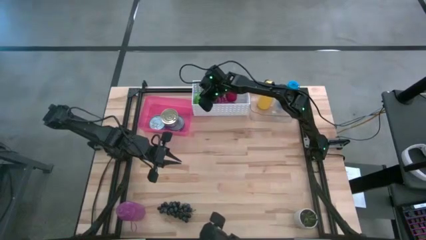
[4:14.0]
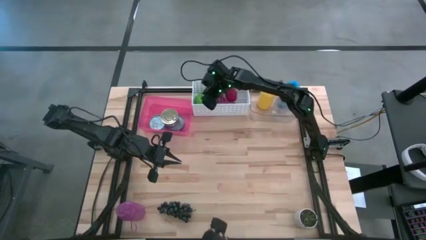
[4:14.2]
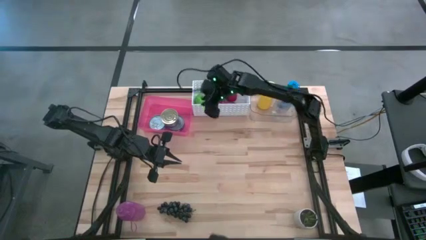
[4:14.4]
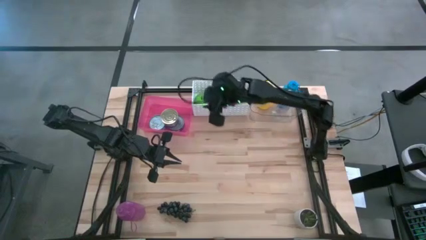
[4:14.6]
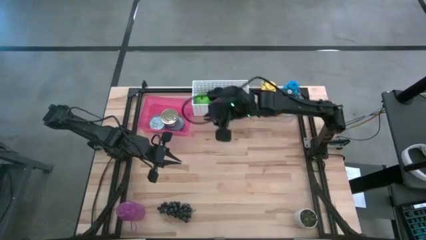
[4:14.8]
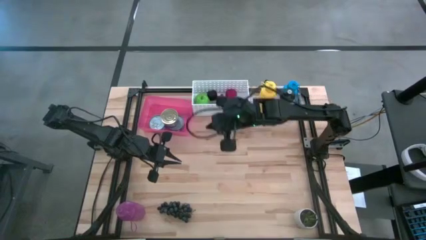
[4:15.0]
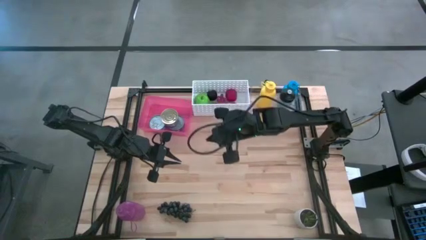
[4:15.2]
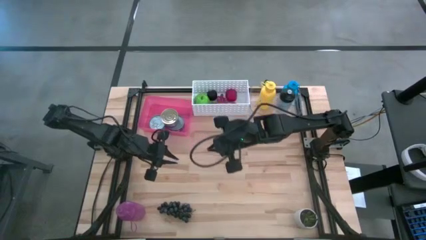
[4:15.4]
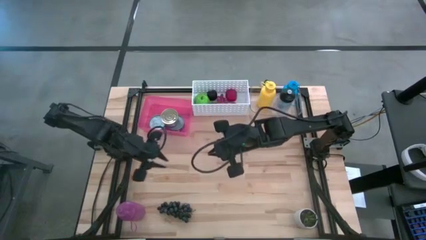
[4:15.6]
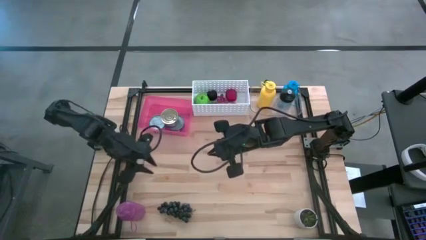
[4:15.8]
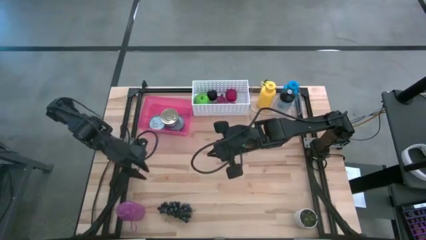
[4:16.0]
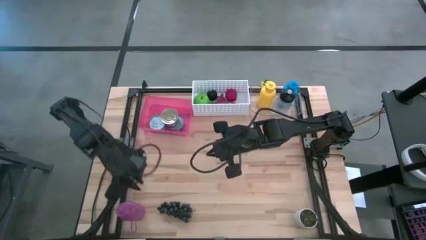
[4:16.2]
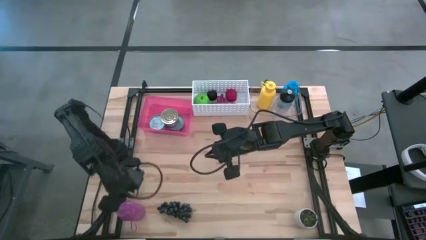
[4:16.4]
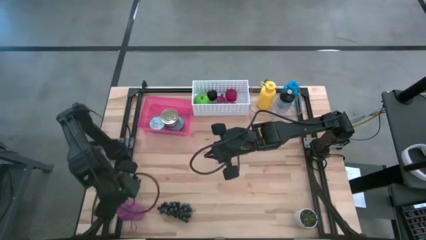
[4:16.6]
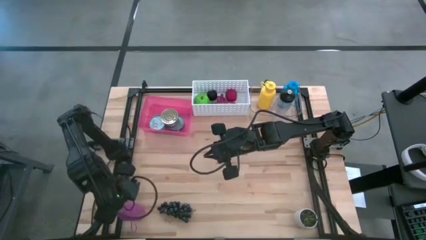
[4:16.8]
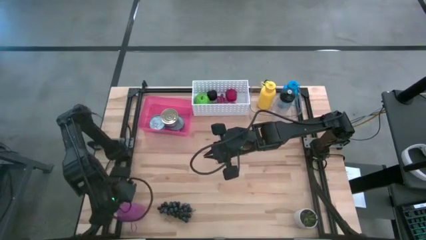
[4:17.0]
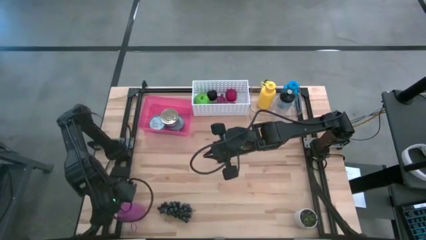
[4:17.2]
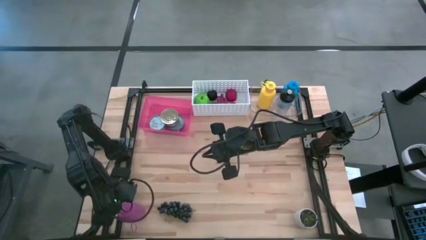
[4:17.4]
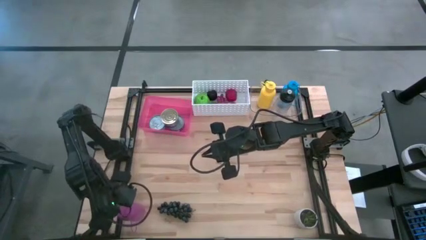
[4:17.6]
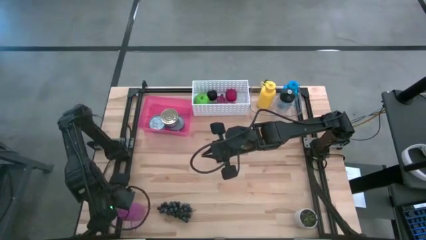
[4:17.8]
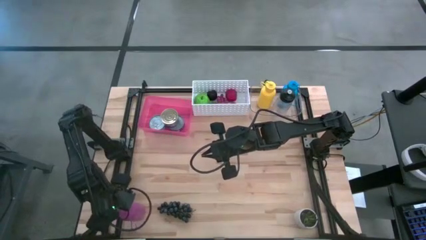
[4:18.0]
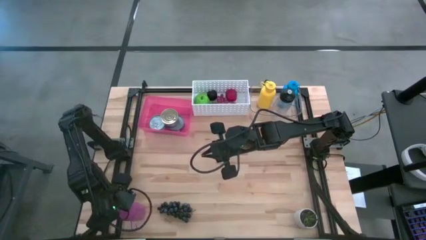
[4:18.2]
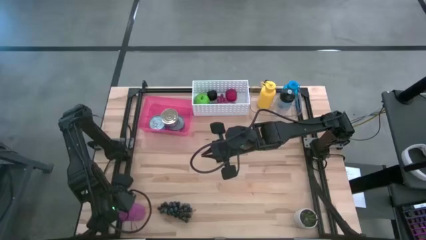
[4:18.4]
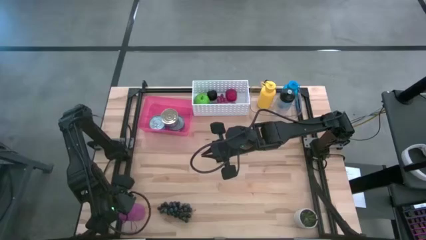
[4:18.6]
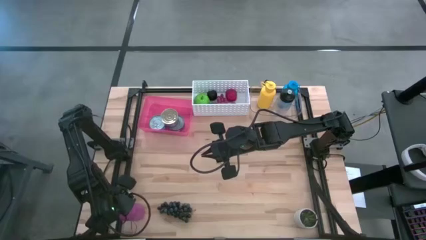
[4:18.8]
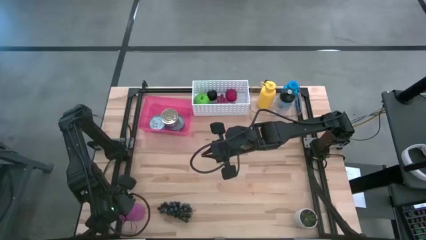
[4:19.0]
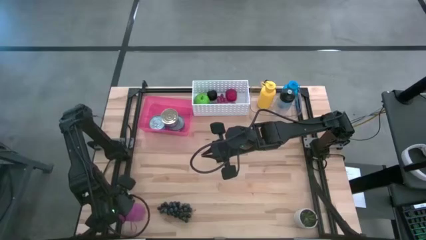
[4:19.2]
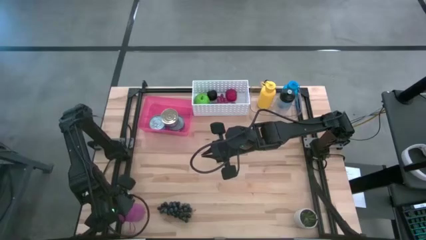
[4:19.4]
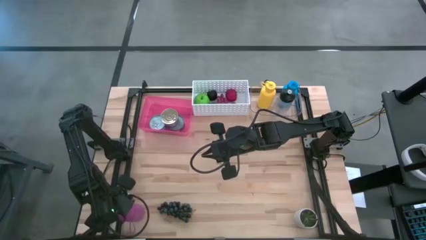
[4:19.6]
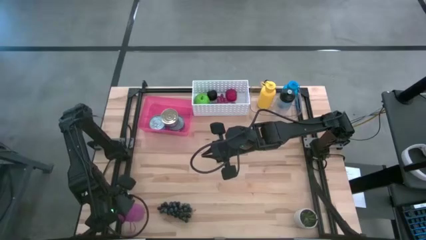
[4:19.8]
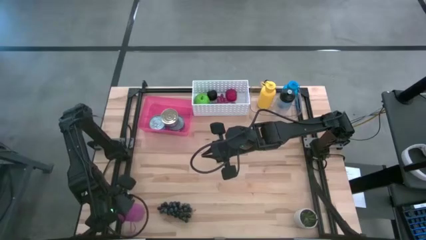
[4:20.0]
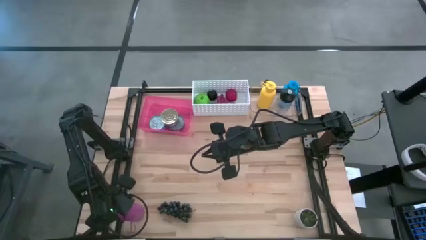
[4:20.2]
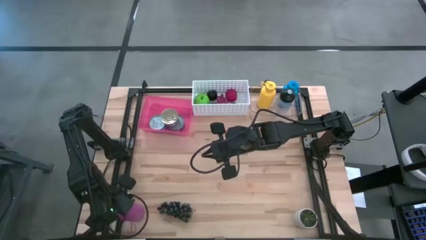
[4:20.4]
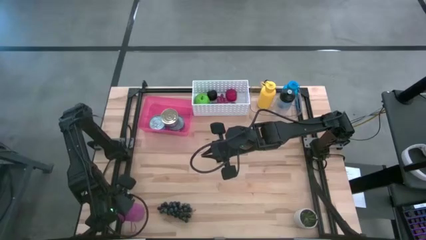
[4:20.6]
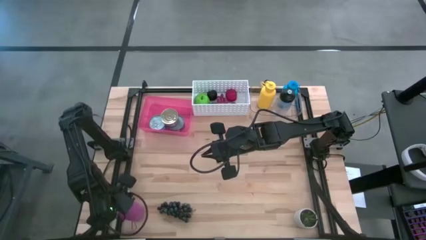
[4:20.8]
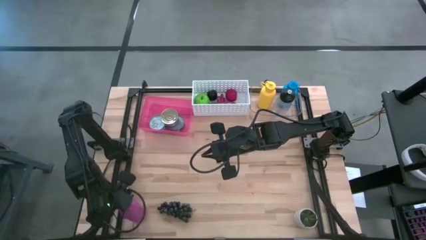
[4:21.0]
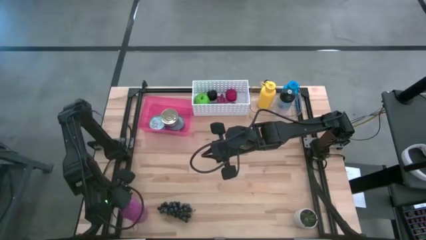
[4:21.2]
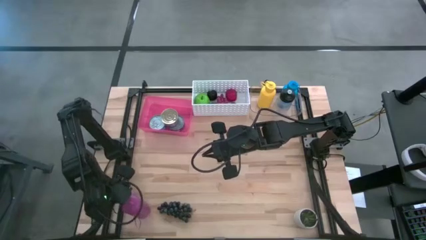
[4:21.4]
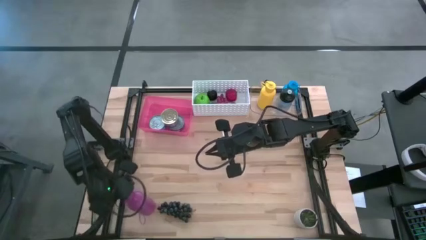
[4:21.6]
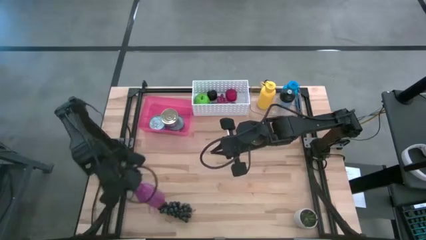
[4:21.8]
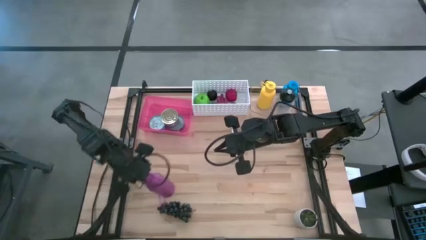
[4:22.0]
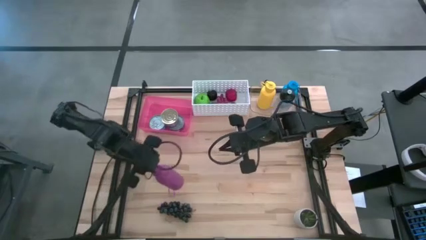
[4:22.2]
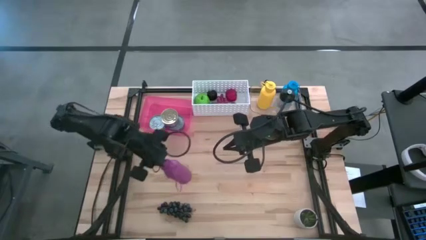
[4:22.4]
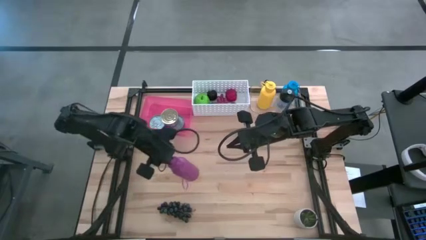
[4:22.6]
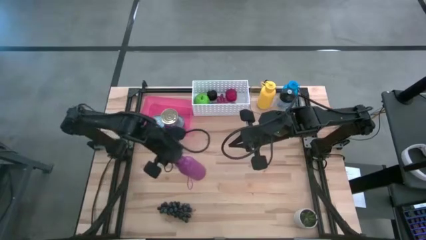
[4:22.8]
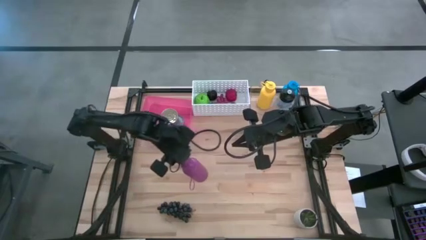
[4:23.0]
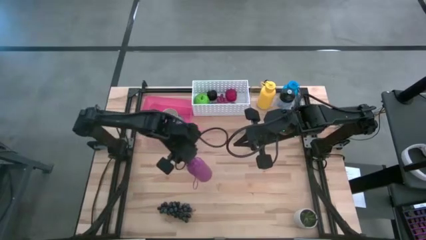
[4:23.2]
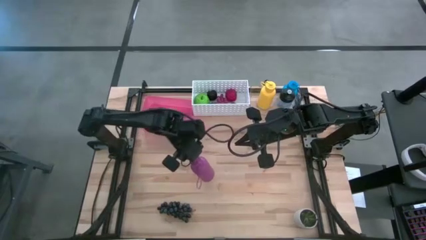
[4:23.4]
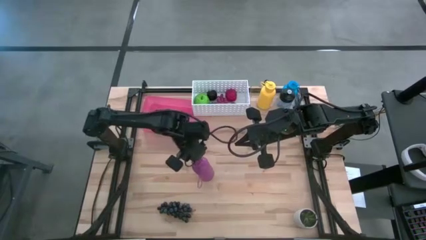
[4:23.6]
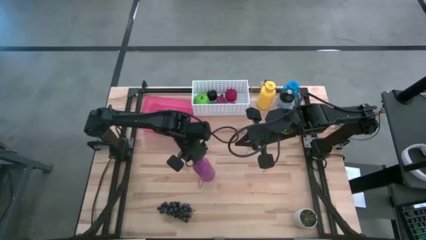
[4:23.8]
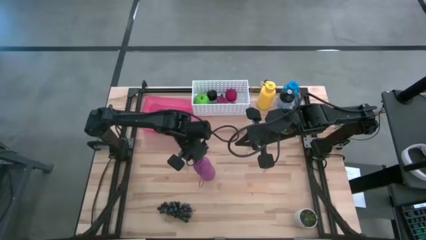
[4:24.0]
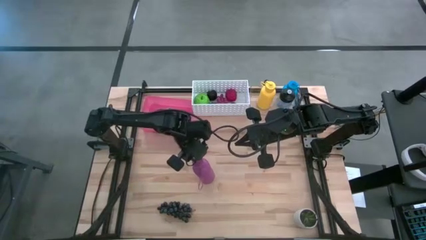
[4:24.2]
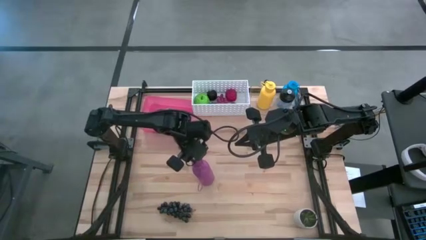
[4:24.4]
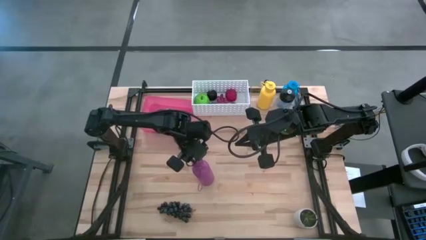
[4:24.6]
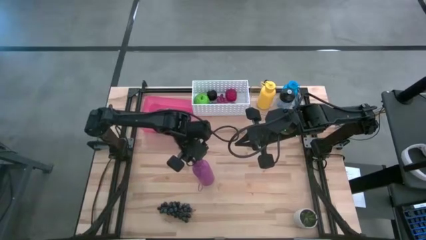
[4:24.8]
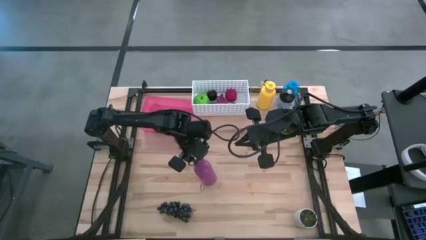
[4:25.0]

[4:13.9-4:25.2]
Task: Pick & Place Food Item
Put the purple water bottle into the transparent bin

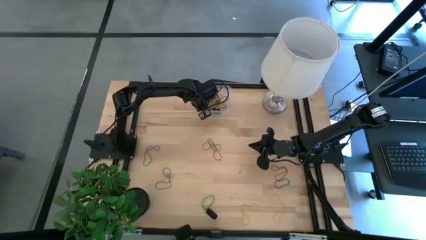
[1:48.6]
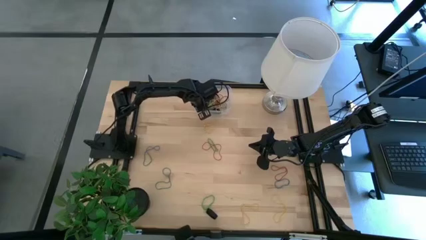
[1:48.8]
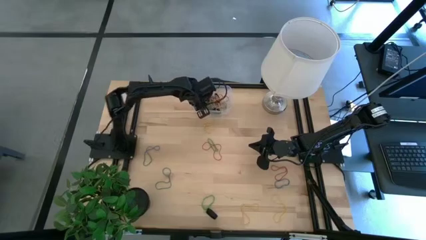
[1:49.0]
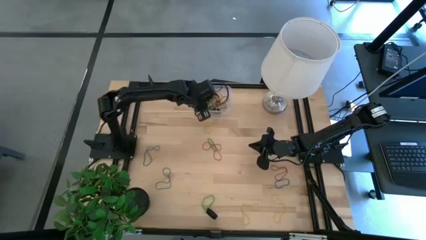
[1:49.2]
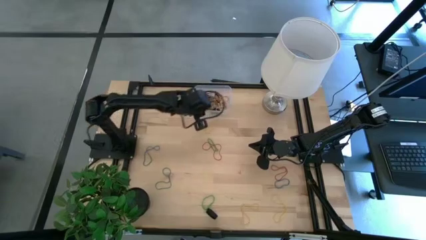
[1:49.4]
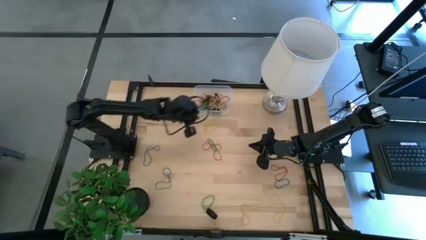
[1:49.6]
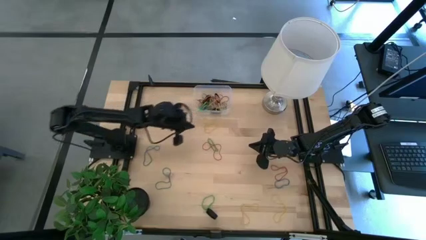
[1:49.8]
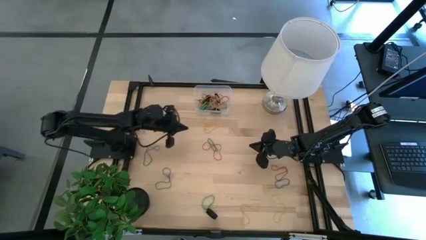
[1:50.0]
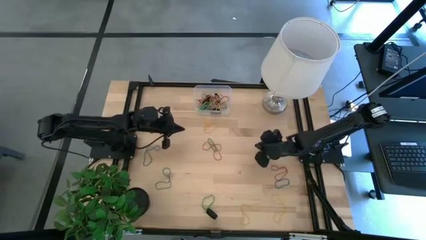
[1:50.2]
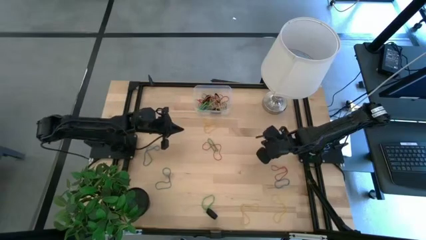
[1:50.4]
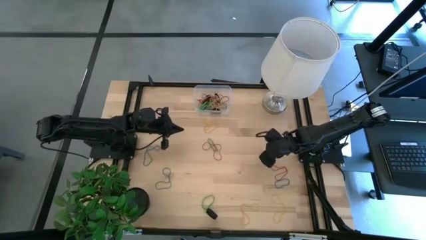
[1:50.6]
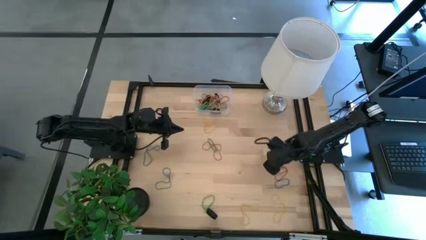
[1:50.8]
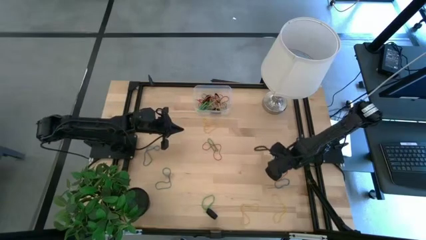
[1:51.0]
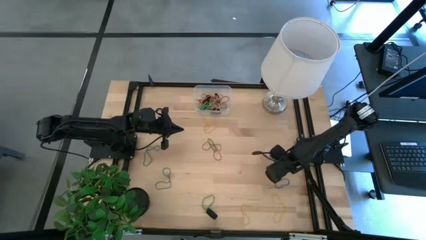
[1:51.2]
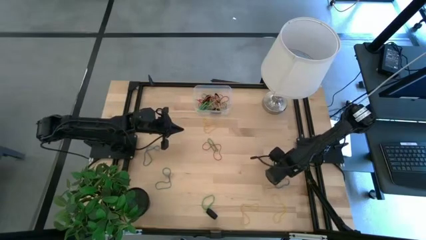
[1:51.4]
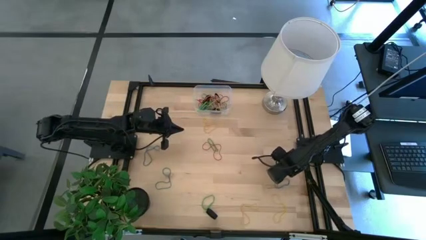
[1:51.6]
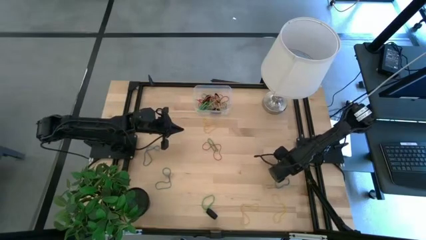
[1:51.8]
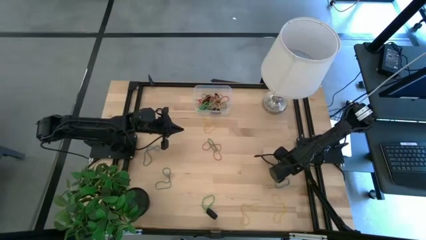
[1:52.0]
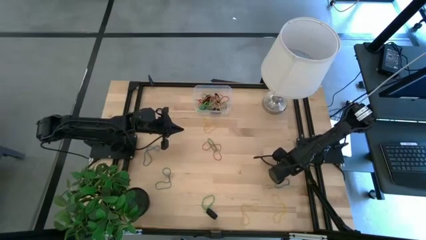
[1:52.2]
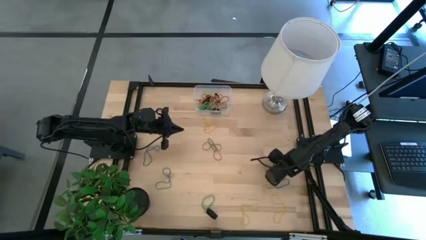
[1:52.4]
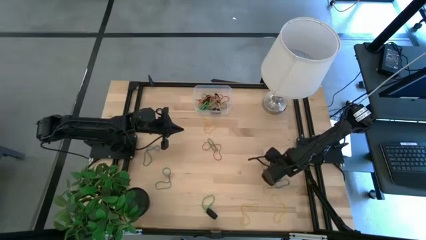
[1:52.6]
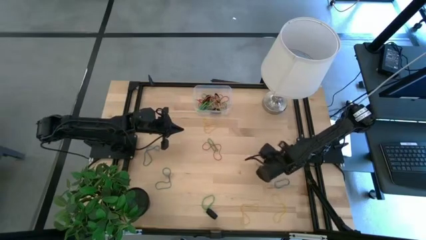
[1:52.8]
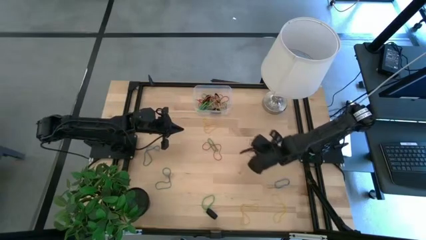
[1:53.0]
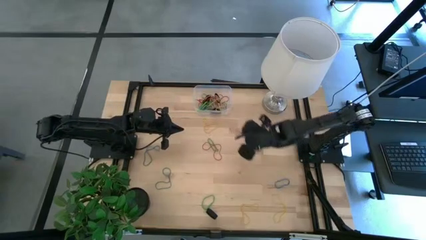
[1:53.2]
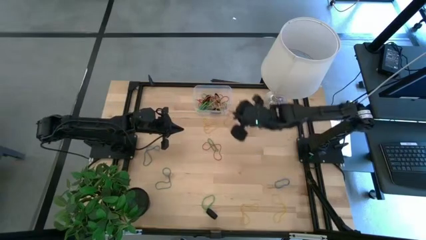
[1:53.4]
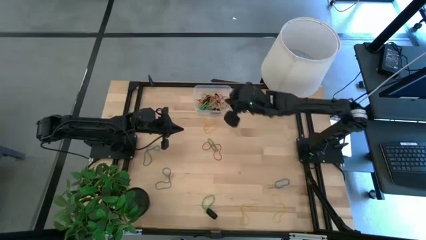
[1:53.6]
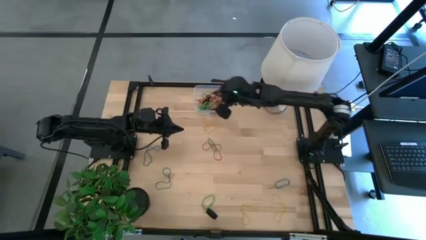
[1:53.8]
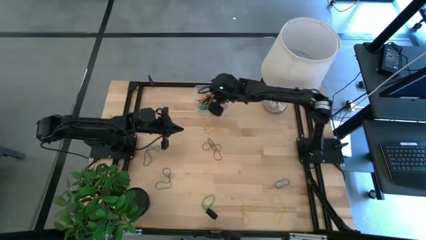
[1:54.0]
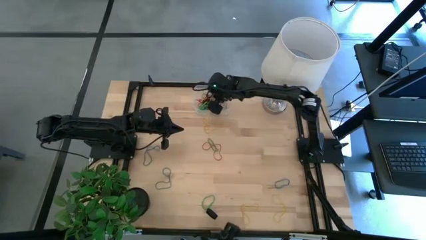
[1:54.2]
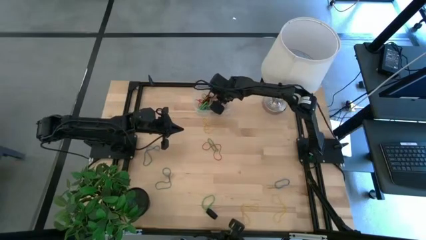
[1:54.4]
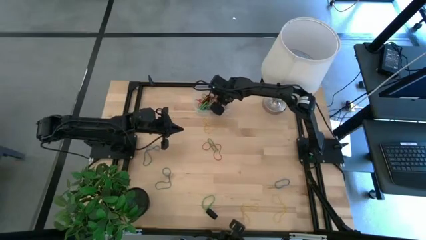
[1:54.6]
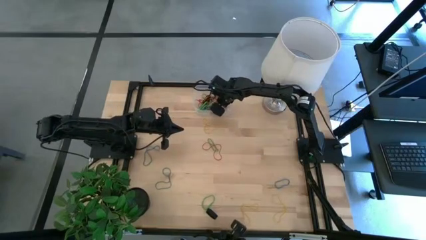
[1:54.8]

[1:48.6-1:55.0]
Task: Pick and place rubber bands into bin
Put the red rubber band into the transparent bin
